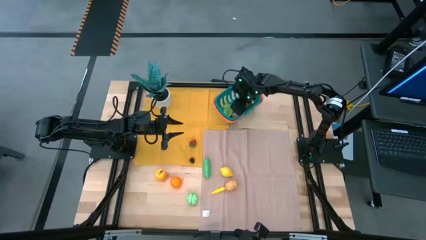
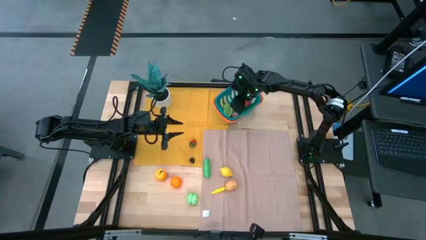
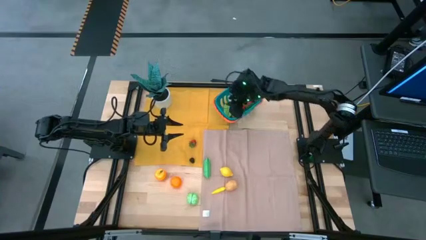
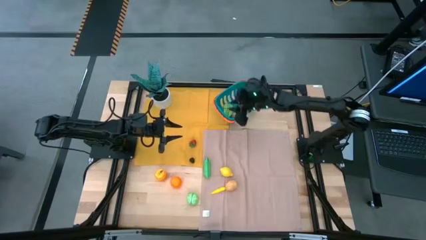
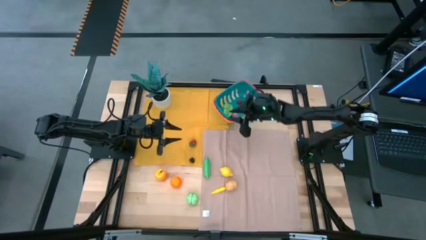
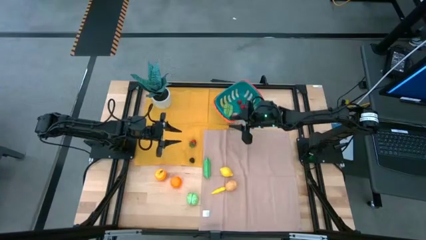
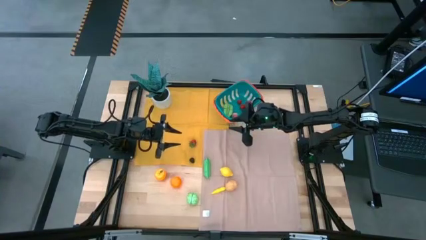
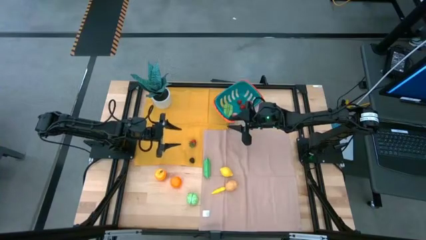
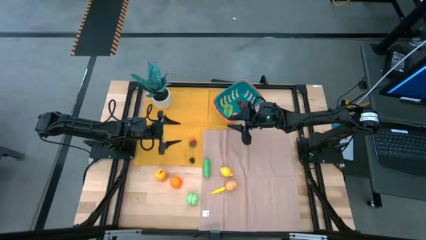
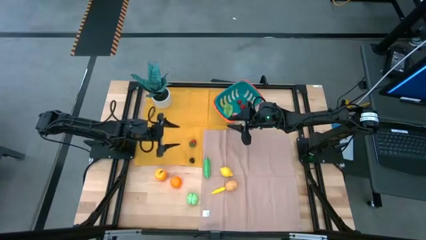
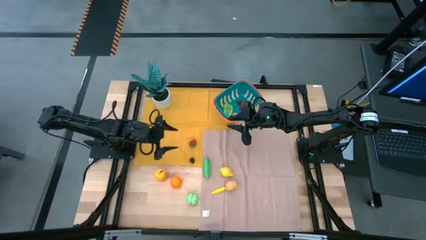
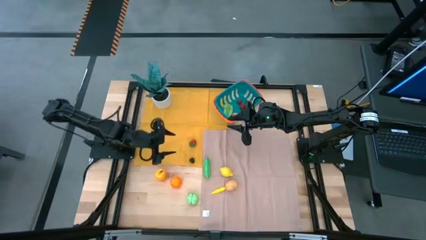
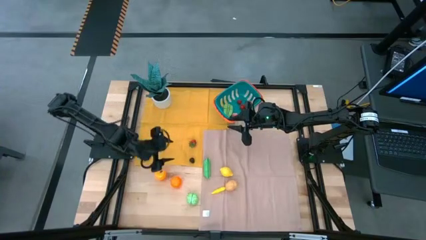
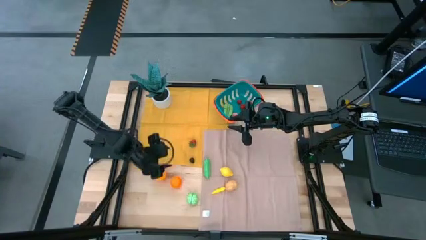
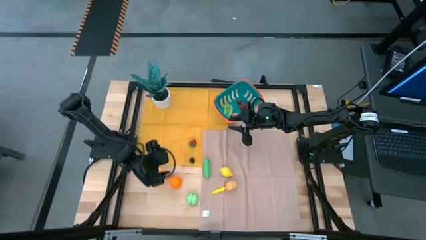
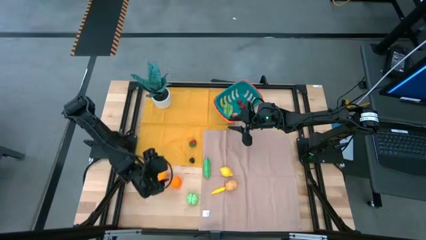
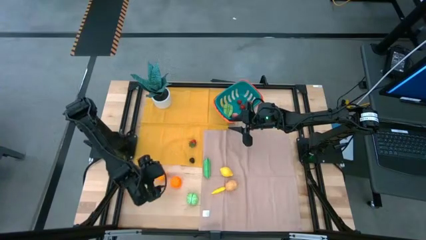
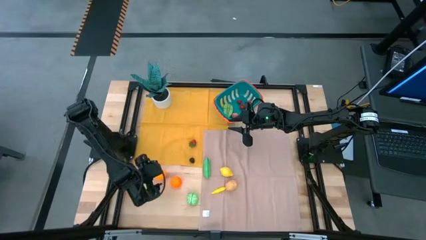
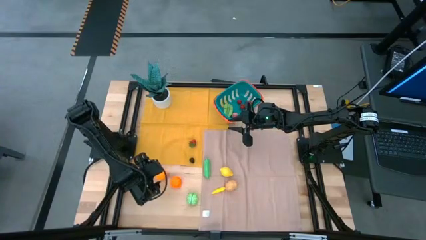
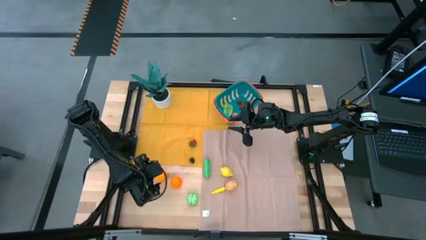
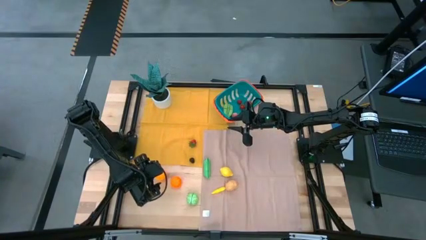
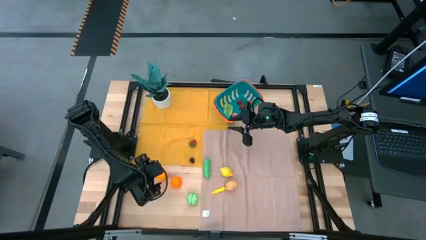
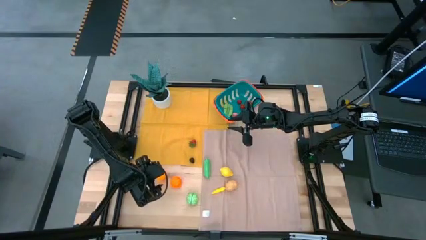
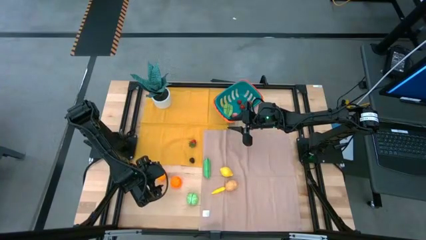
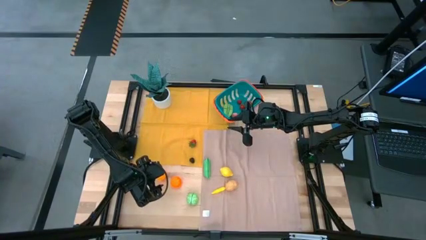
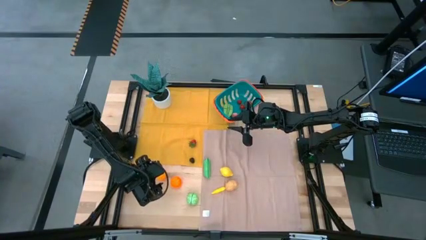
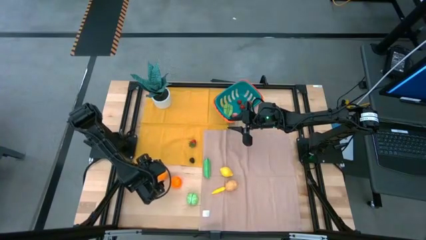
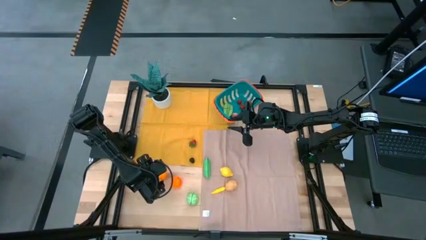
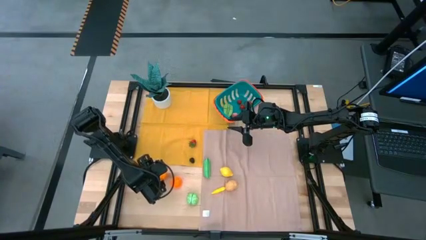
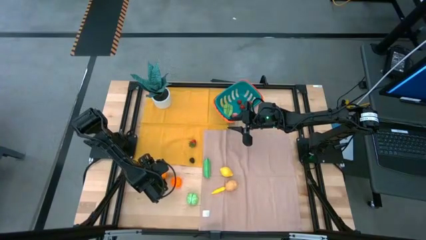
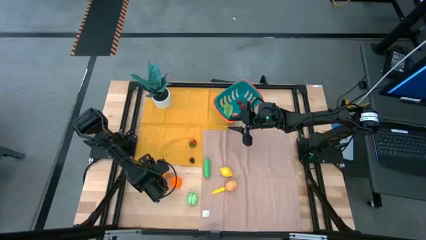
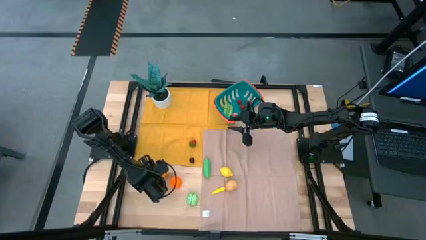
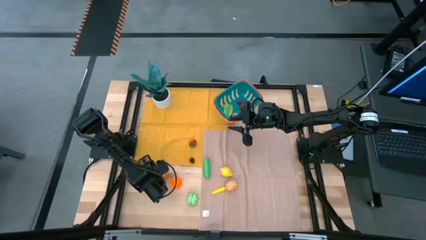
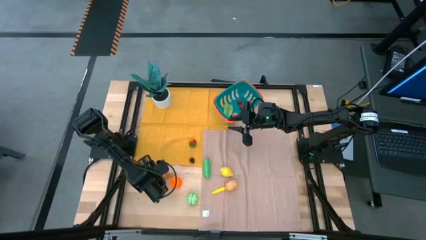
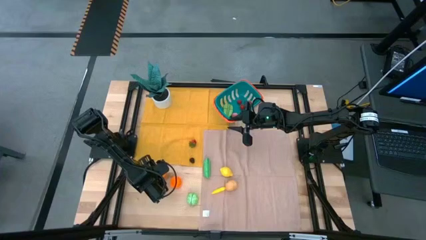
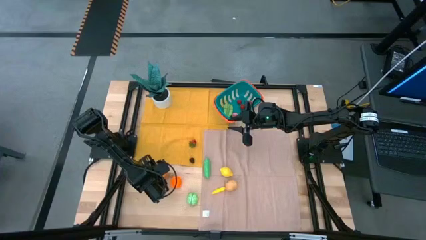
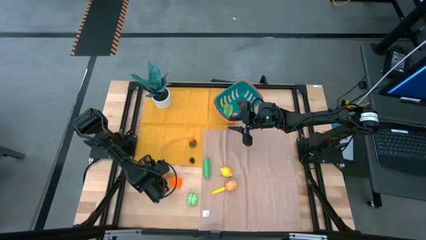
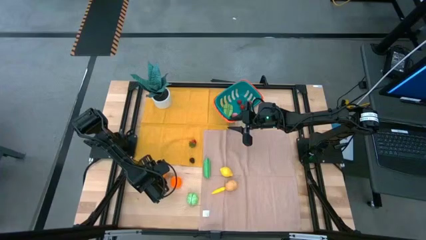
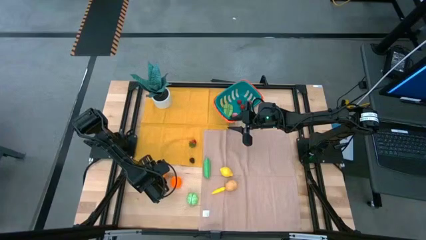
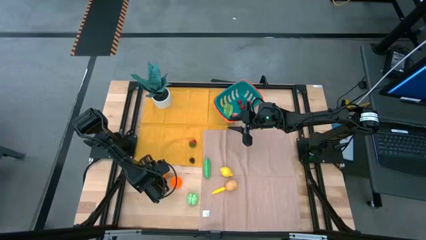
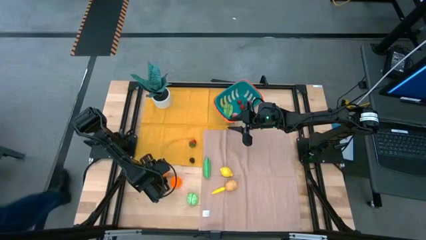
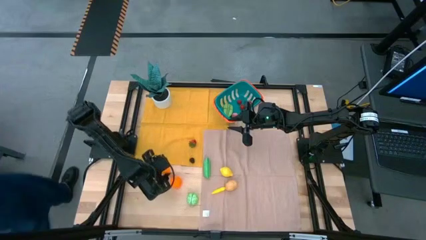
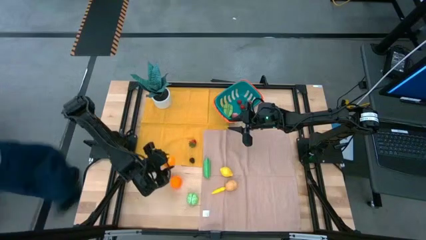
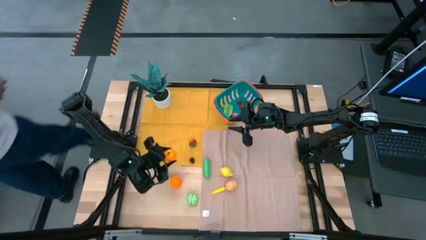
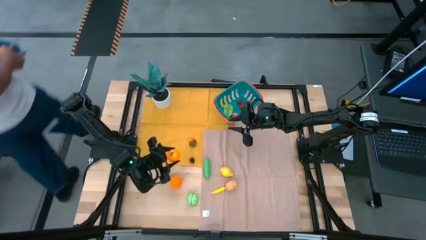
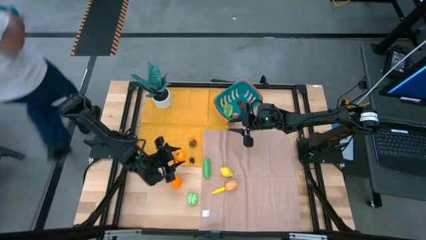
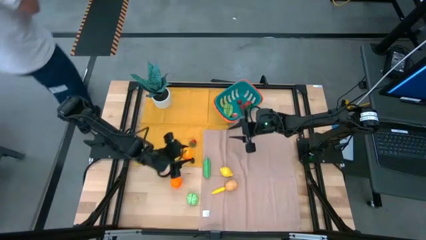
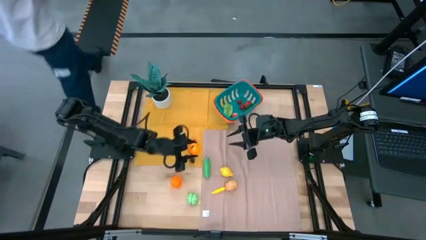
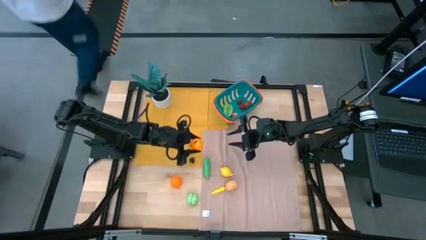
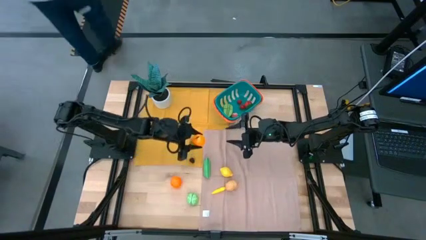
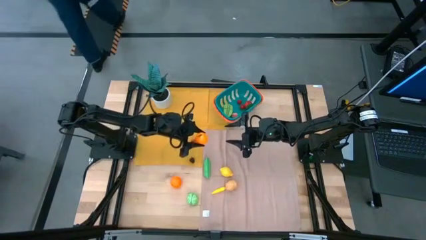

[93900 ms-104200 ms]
Task: Pick and placing Produce into tupperware
Put the orange into the basket

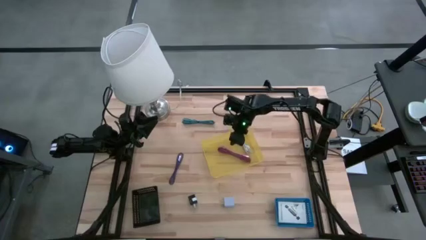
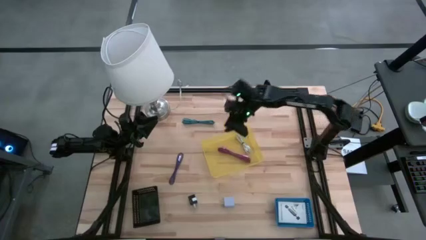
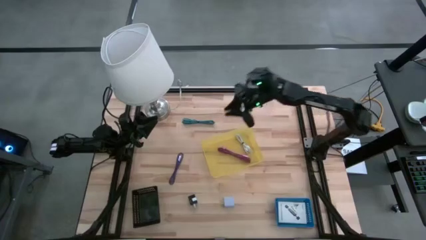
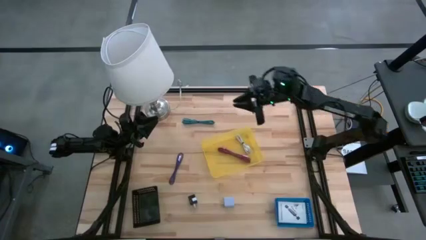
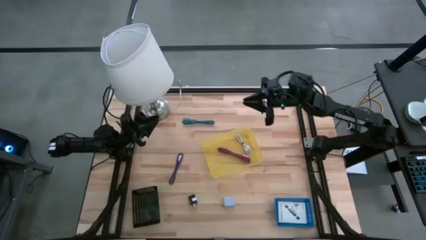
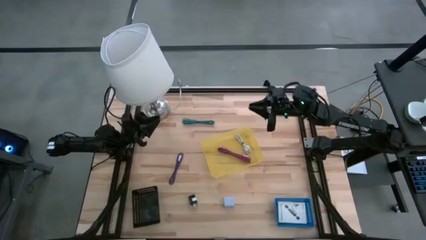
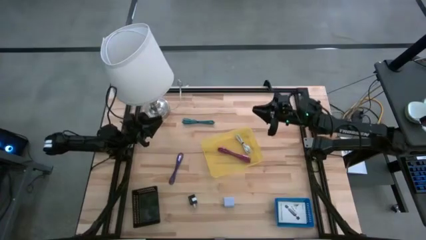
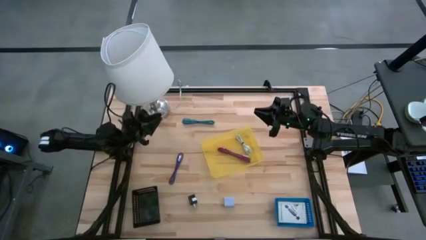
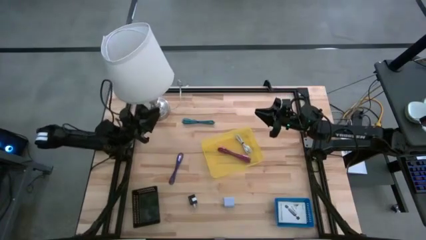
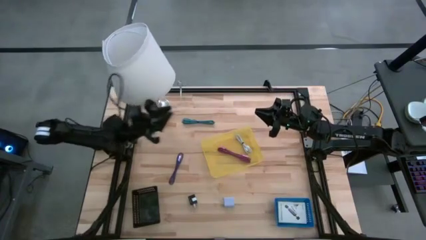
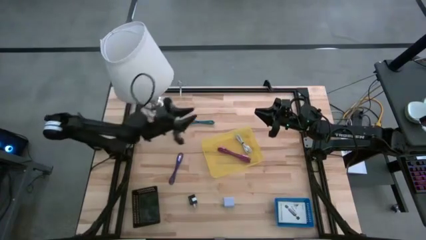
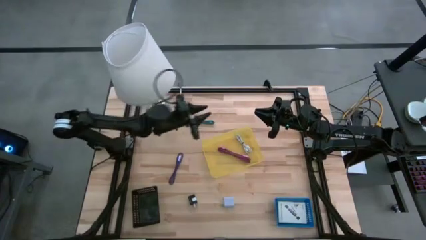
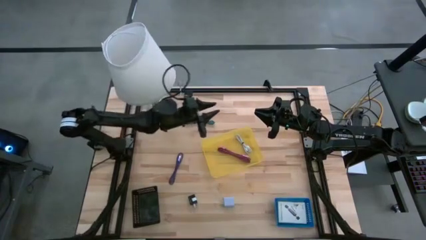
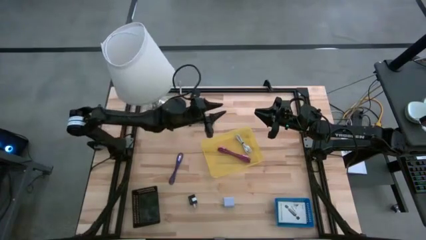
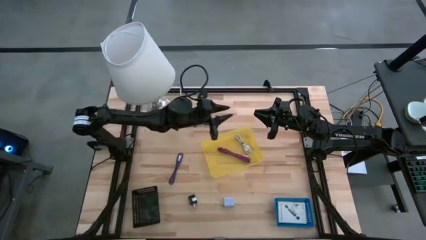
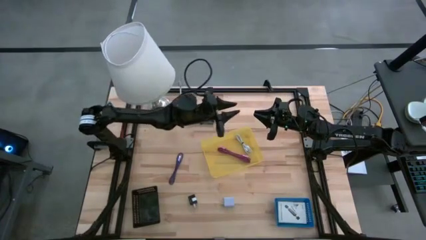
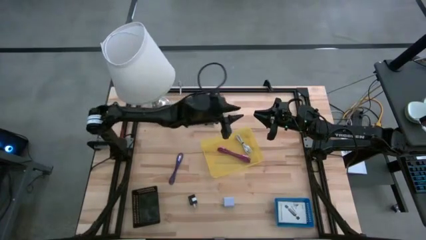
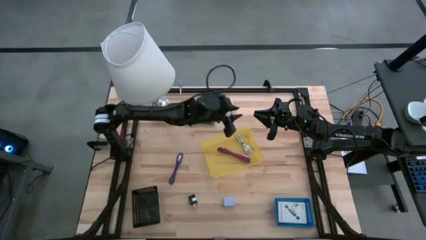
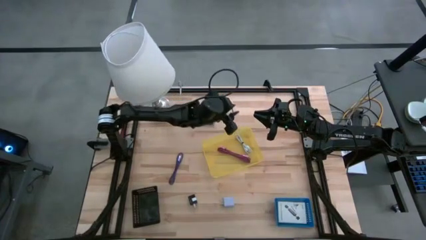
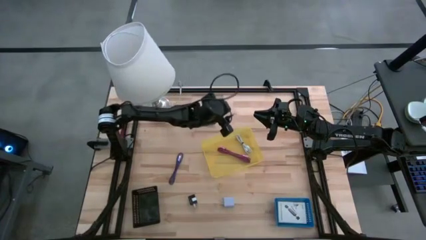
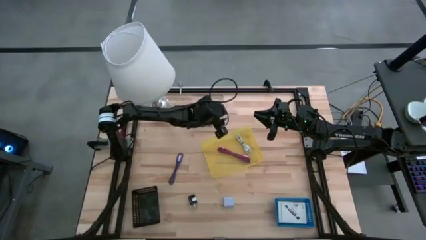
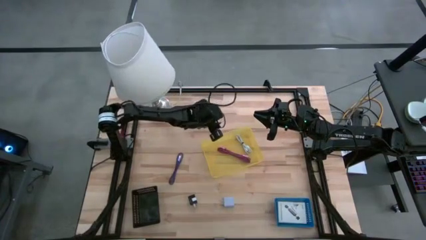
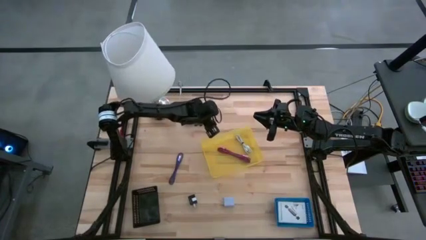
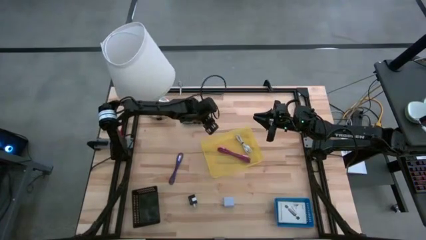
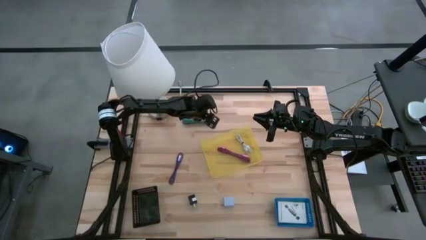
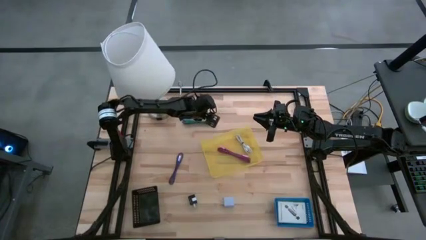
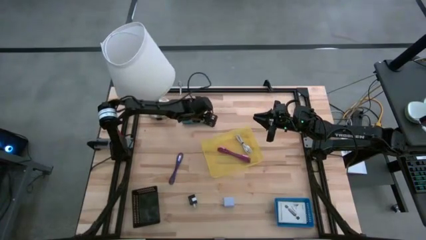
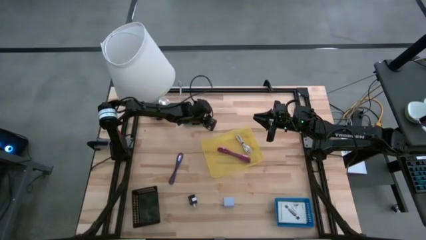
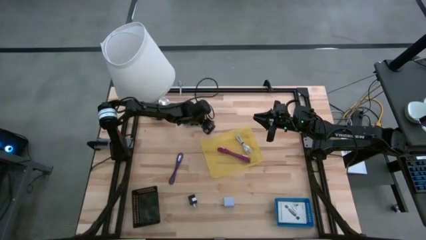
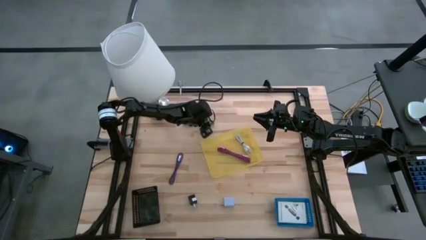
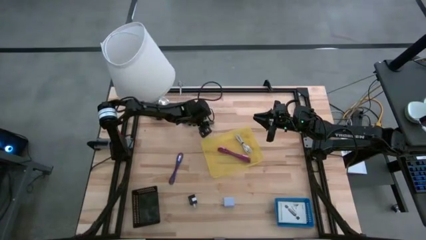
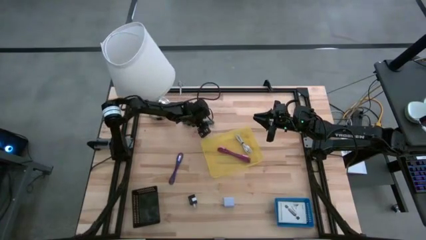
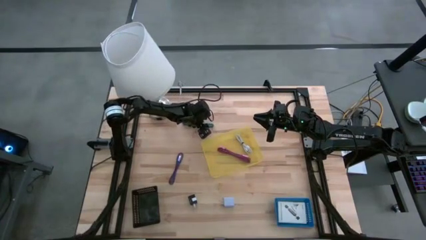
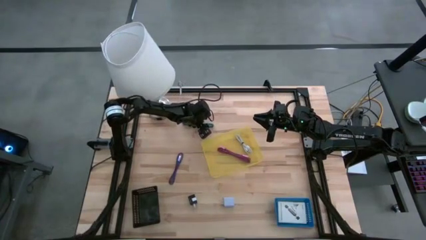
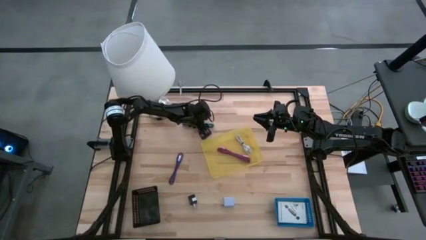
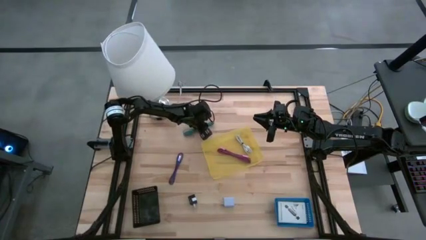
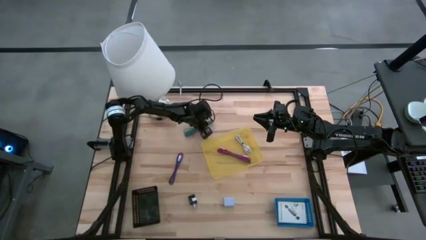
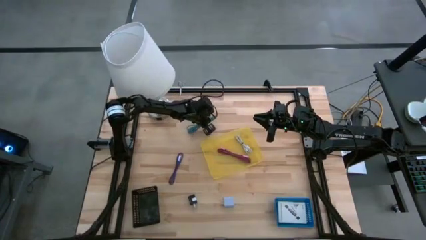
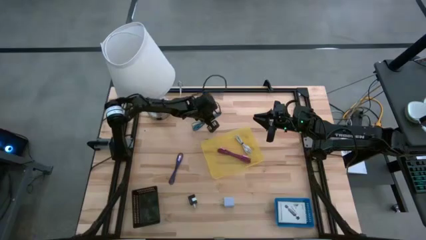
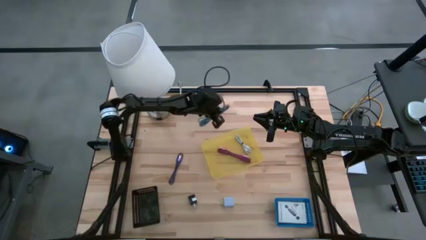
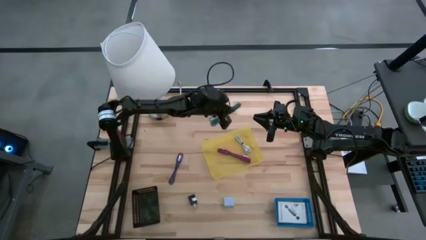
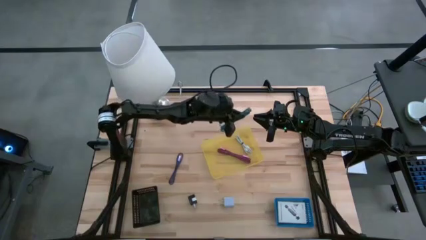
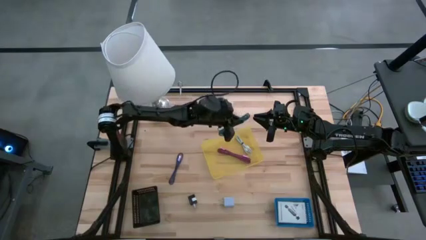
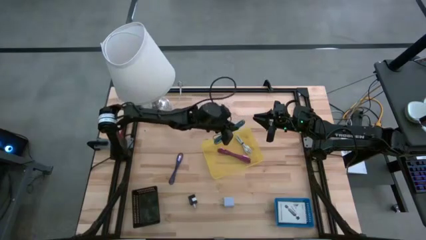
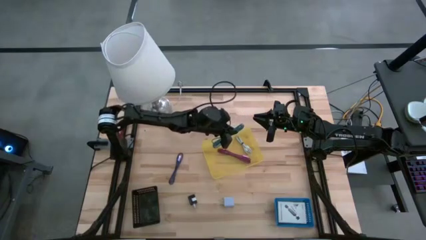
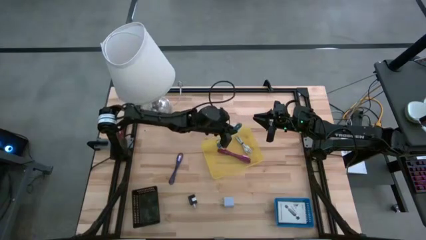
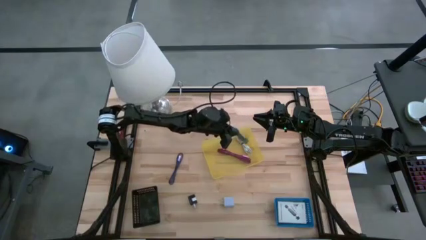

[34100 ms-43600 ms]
Task: Pick and place items into bin
Put the blue charger cable into the yellow bin
